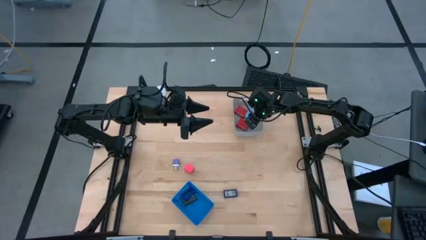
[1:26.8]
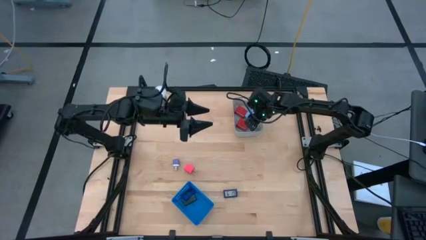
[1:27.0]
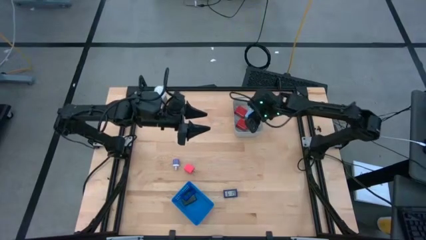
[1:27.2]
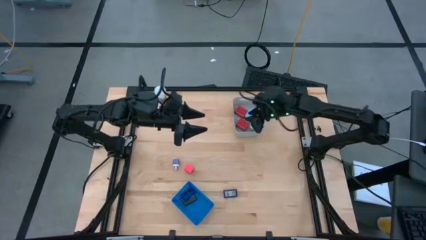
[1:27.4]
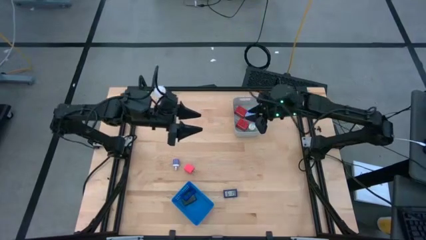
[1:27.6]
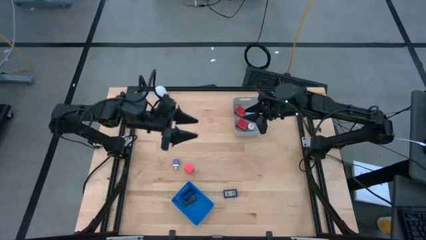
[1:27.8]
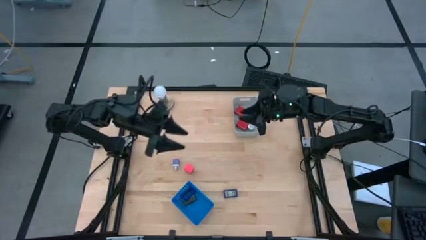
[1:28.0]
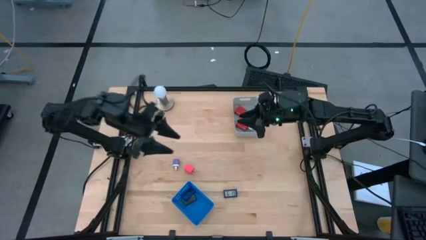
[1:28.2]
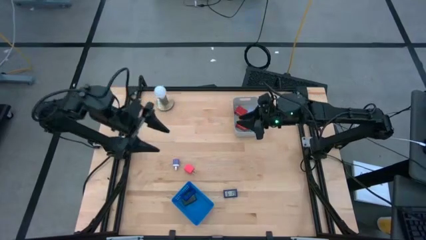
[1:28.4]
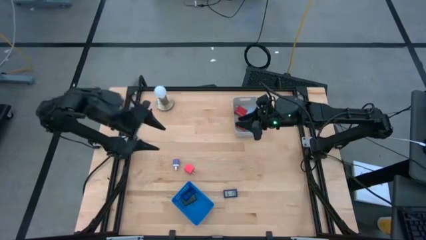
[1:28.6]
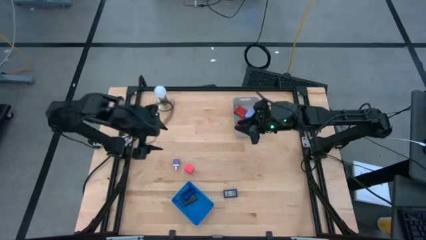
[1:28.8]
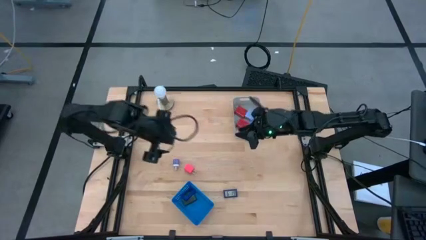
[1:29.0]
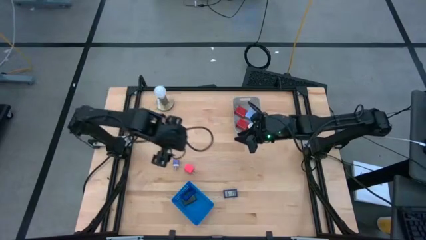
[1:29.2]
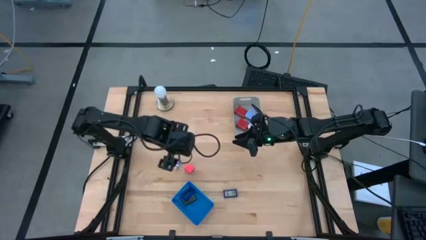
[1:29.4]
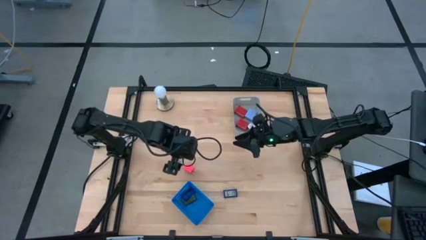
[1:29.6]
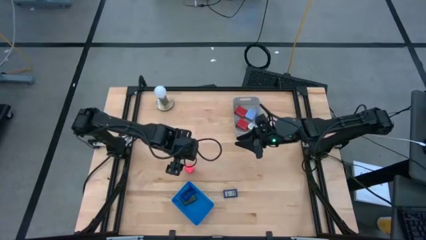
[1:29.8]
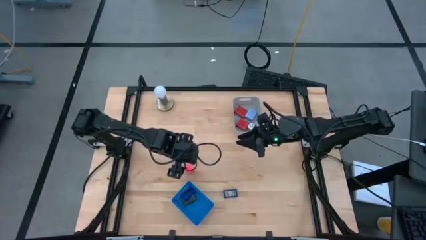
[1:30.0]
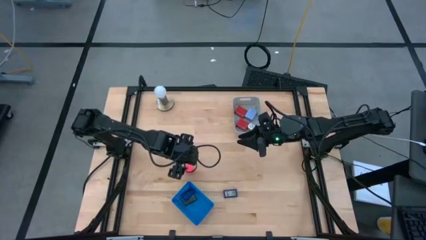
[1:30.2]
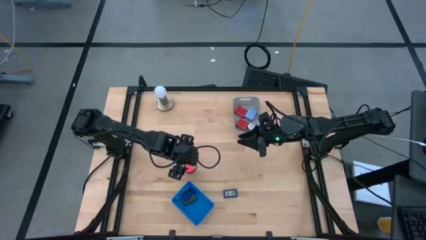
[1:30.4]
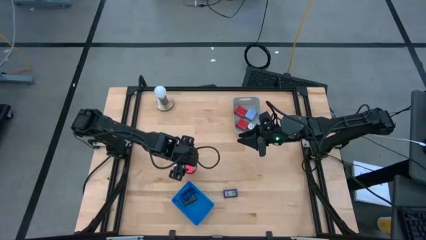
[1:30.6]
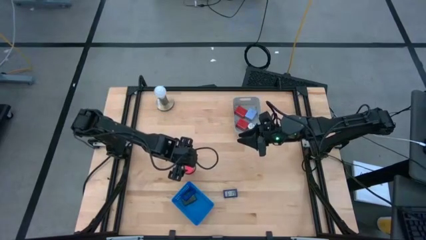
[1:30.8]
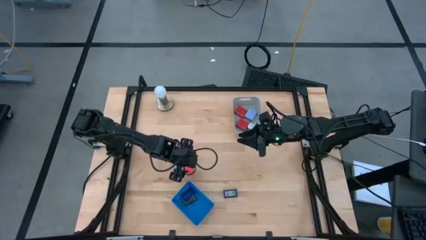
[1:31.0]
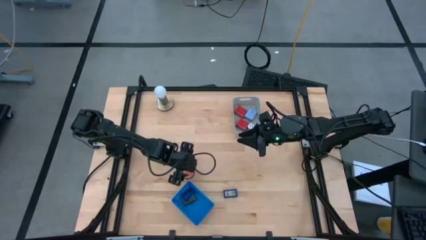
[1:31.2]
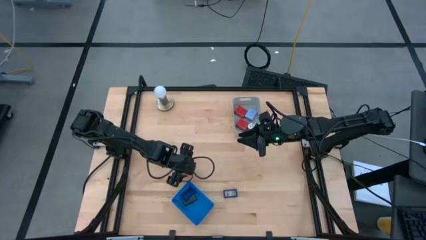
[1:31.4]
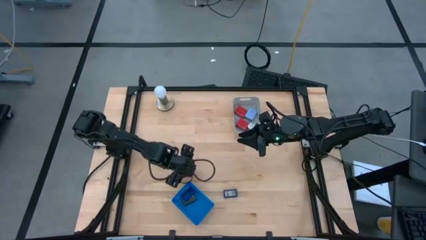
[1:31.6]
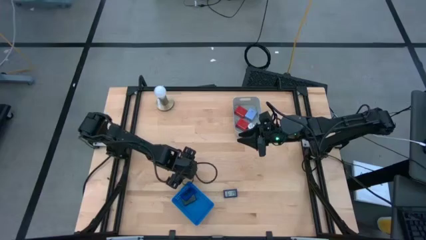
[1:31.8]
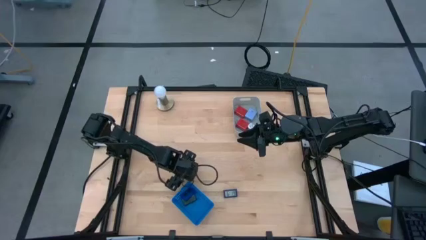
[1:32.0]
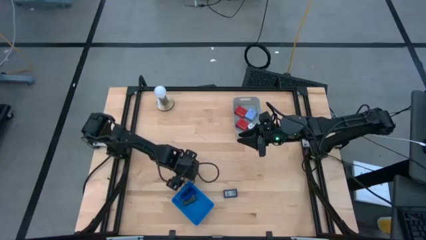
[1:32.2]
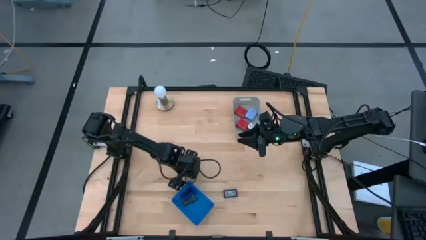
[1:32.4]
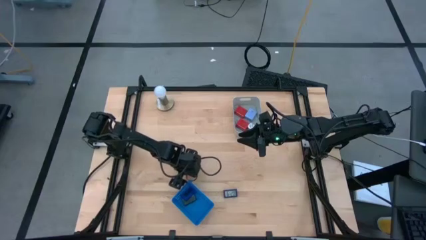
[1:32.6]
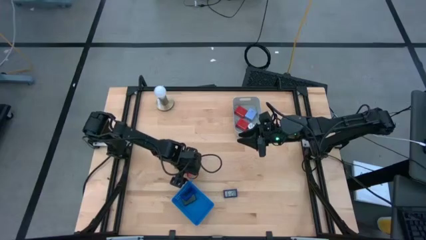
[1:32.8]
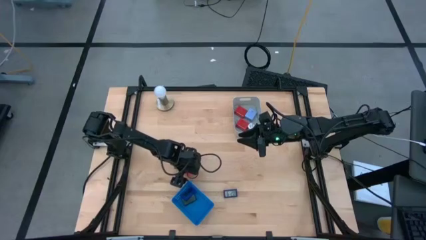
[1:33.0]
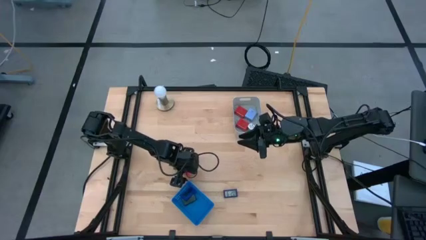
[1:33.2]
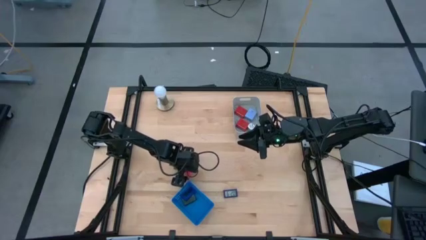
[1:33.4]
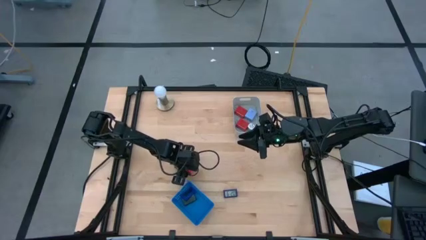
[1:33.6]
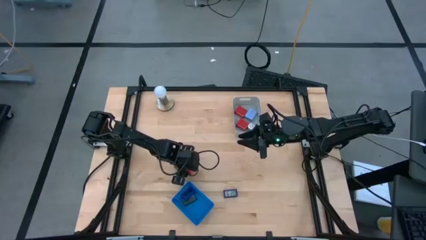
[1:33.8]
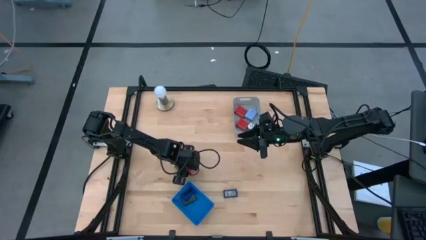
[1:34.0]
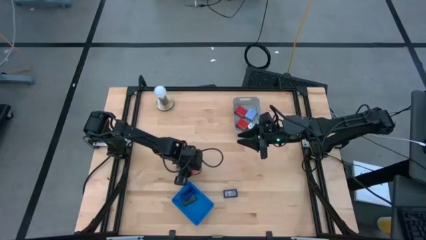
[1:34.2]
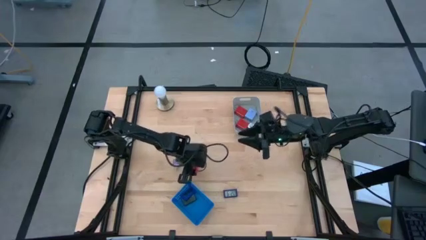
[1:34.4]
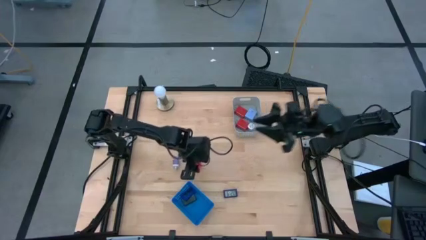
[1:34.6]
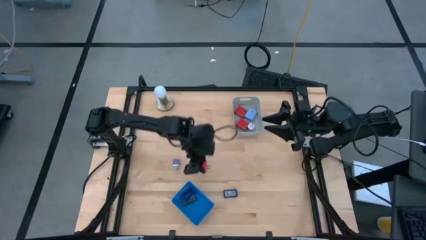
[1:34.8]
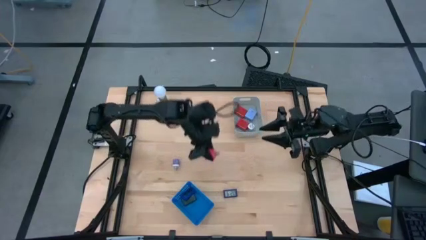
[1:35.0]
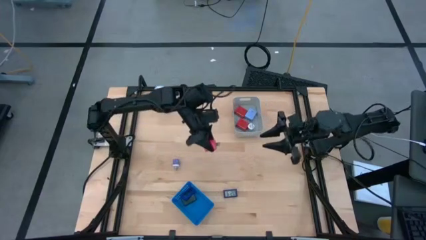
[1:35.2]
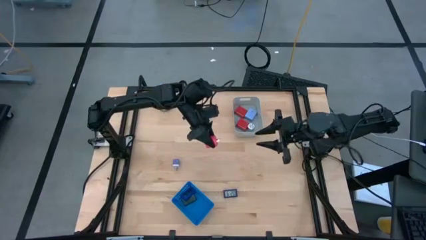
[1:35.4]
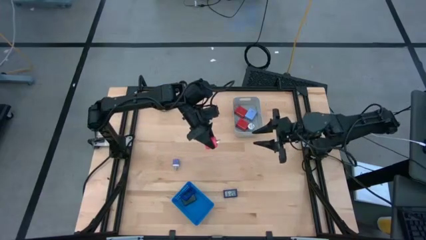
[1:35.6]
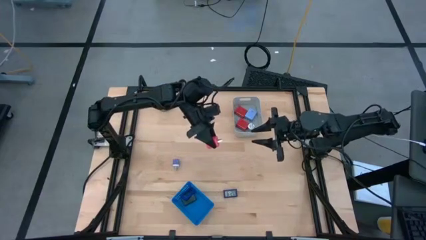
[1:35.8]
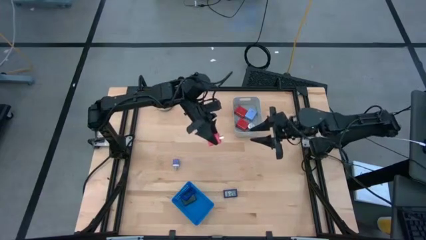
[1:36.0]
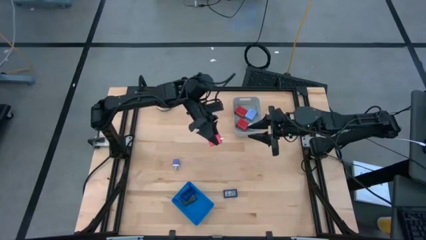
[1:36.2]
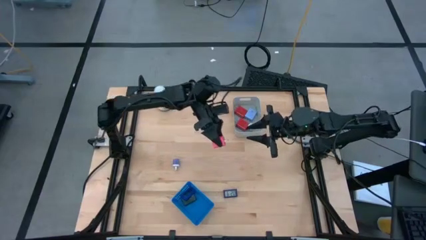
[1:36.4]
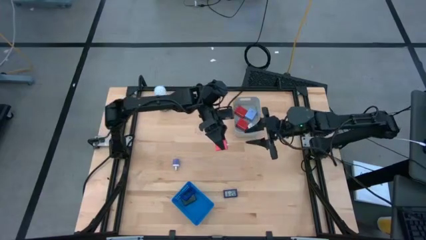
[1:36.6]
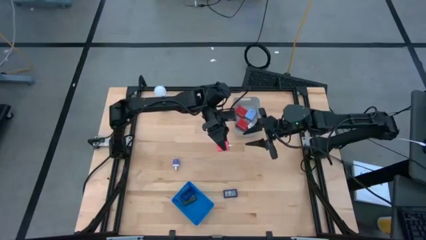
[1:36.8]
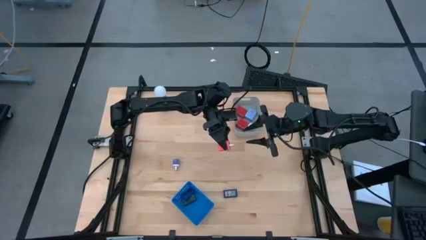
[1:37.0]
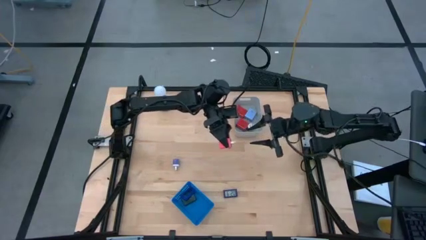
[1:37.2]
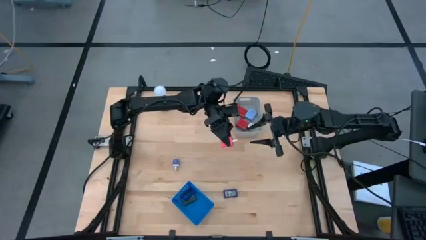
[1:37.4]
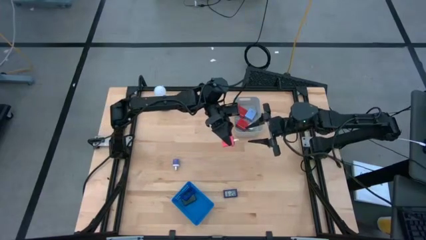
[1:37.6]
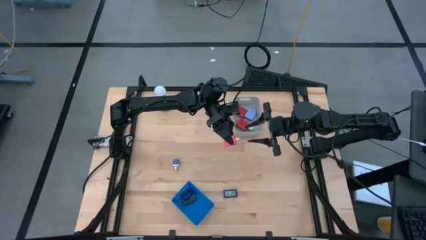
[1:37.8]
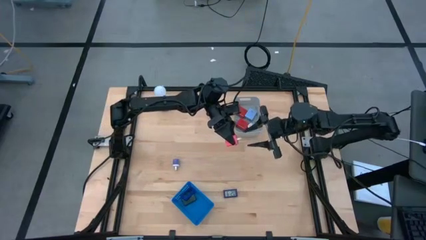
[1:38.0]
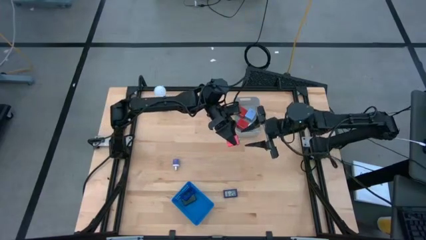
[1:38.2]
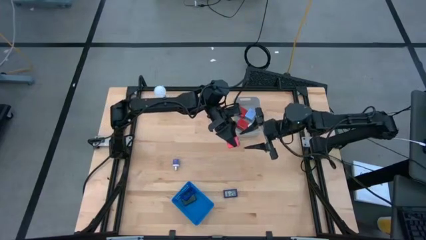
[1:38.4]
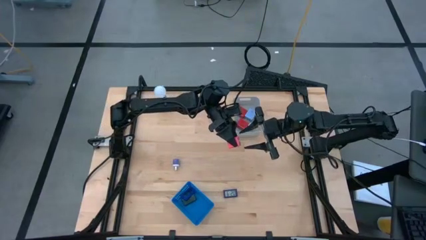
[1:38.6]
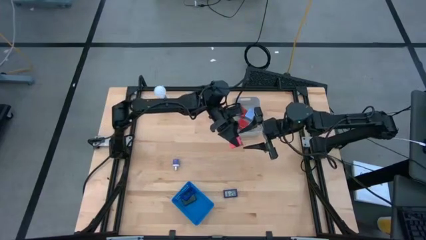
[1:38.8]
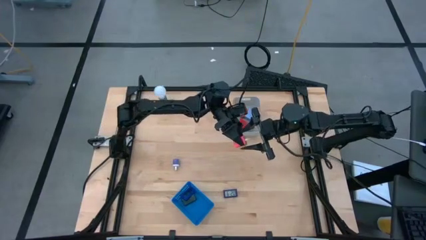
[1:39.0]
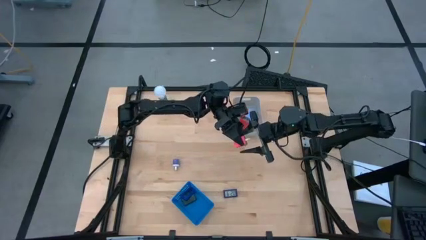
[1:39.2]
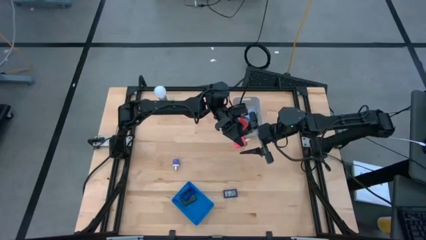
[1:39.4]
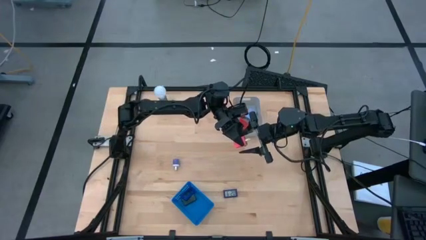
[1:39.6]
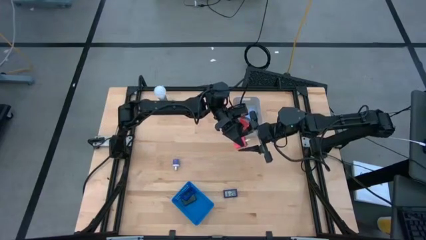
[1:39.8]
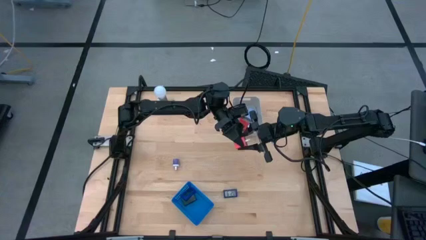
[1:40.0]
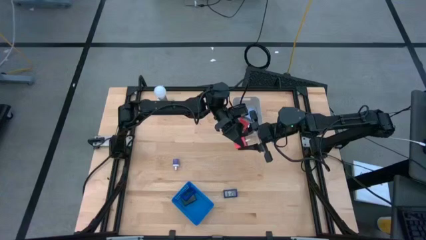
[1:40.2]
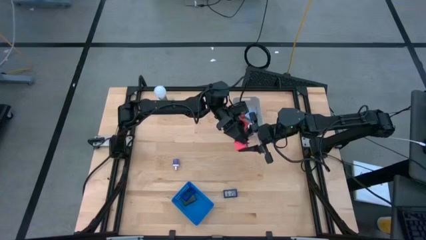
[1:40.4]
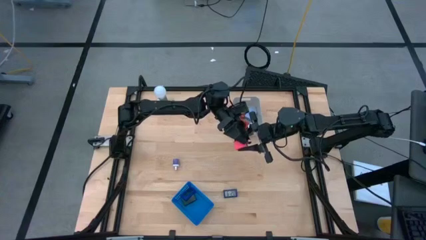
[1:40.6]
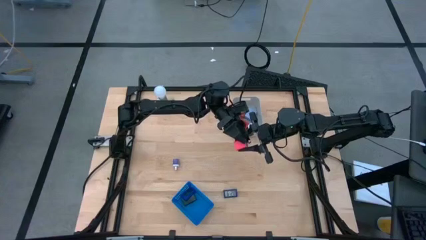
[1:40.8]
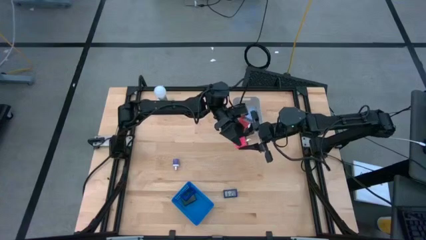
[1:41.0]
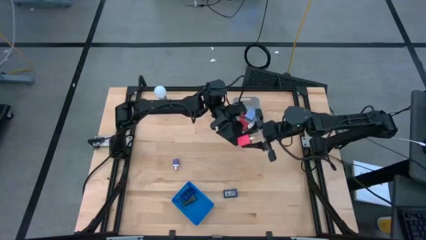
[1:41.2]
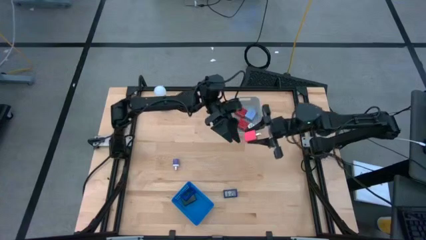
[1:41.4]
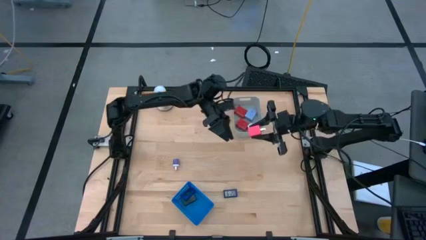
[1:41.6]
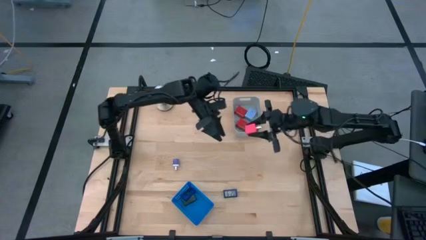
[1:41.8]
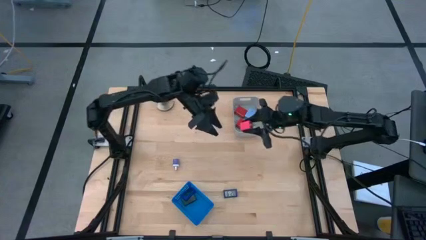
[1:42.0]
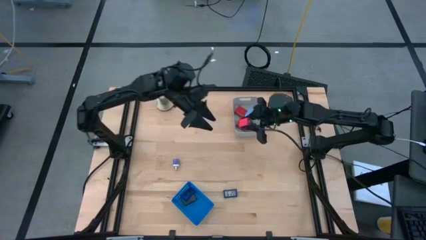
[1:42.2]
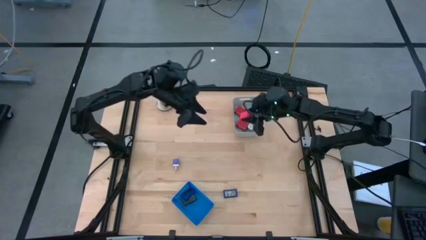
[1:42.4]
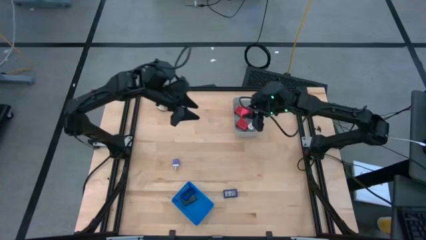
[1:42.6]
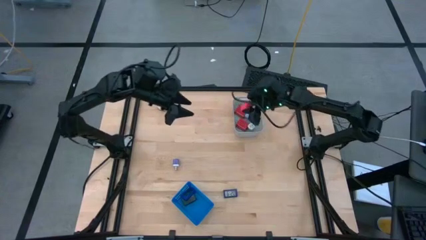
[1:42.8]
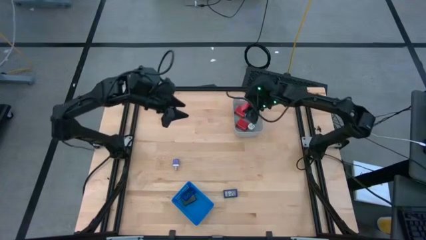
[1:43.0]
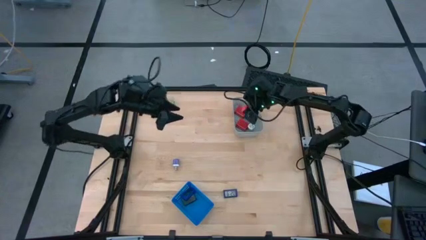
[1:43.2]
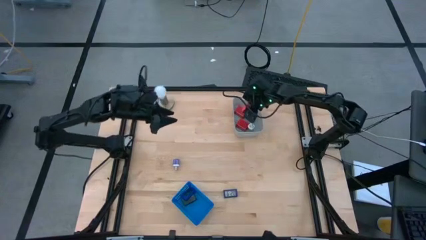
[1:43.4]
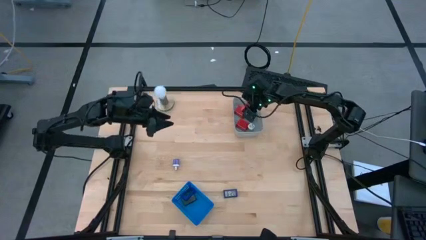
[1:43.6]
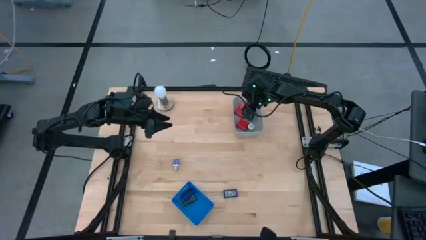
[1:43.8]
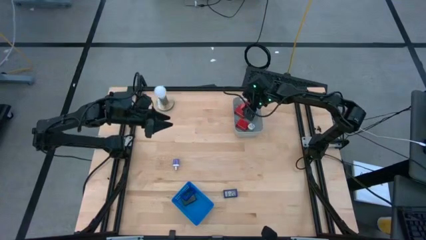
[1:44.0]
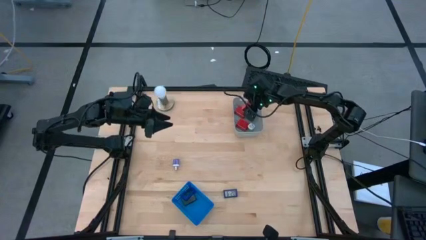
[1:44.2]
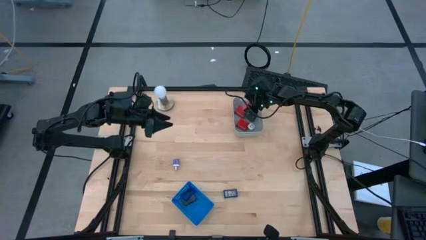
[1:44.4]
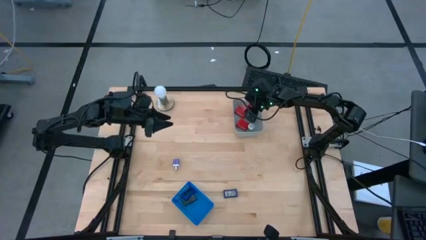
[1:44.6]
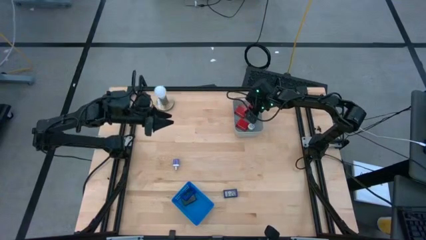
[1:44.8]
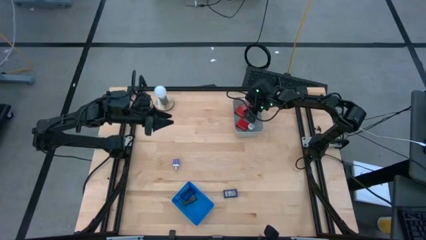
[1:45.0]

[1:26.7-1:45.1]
Task: Pick & Place Office items
Put the pink charger adapter into the gray bin
